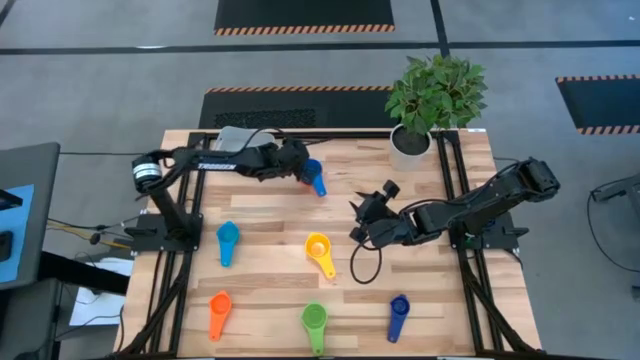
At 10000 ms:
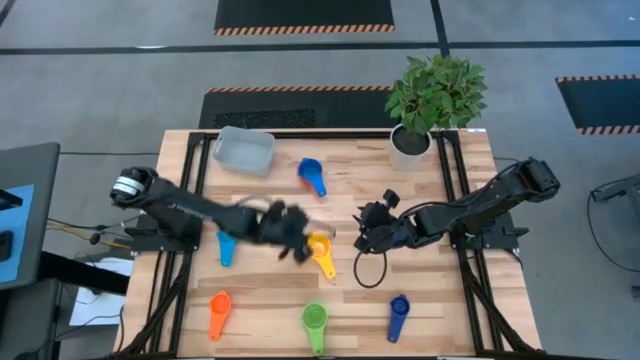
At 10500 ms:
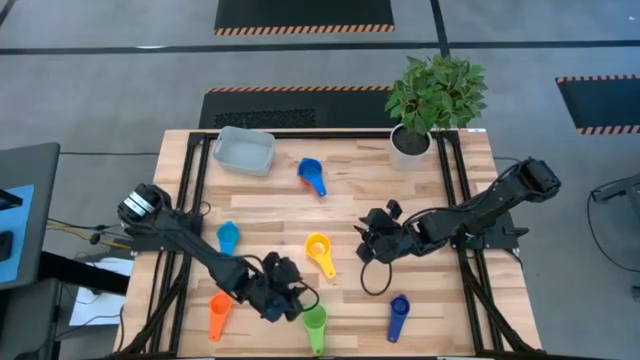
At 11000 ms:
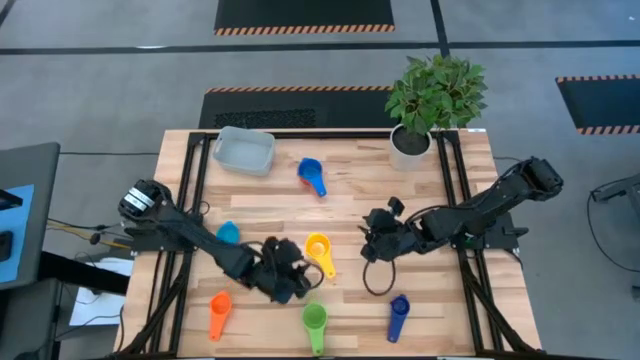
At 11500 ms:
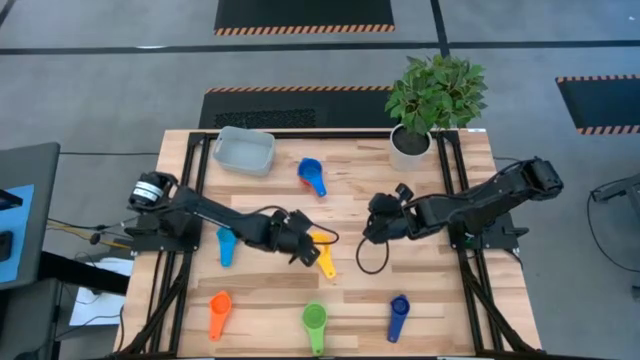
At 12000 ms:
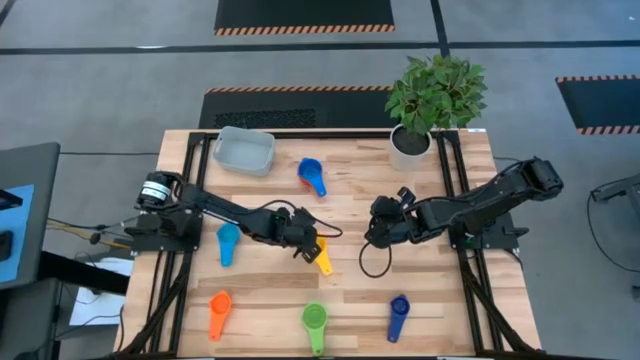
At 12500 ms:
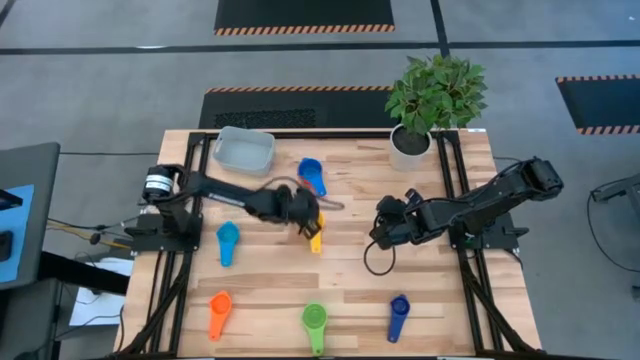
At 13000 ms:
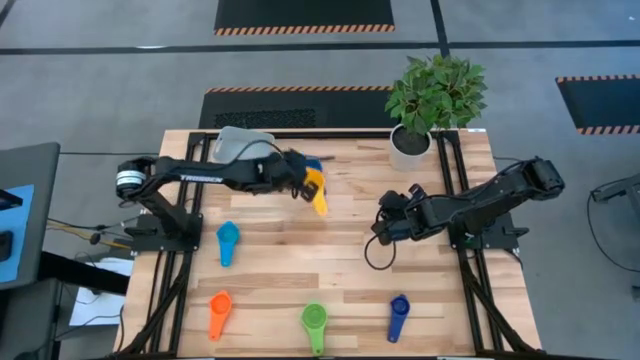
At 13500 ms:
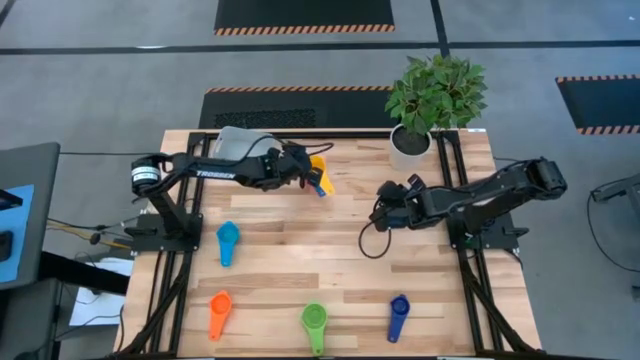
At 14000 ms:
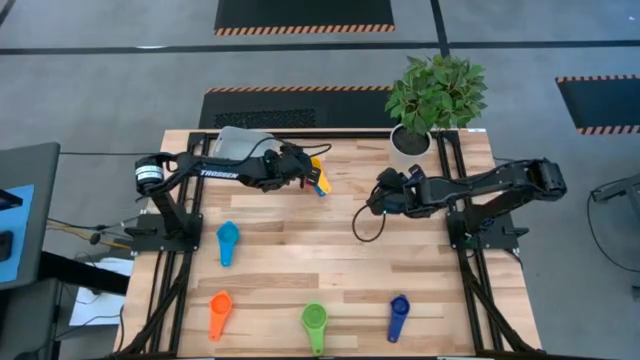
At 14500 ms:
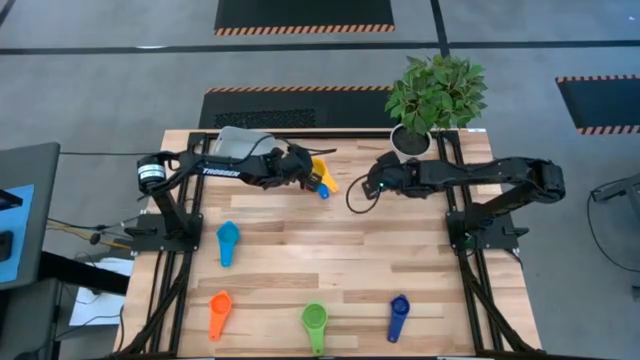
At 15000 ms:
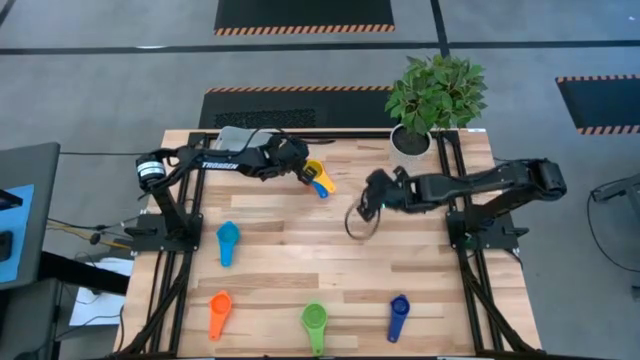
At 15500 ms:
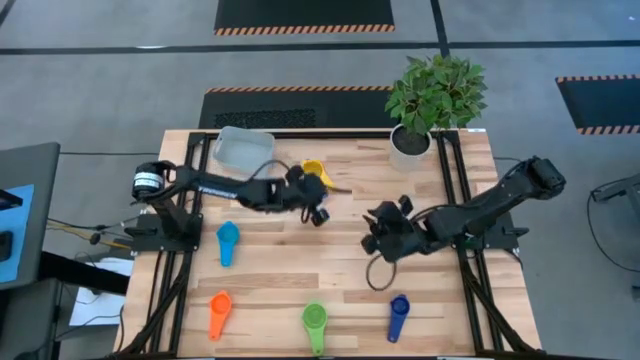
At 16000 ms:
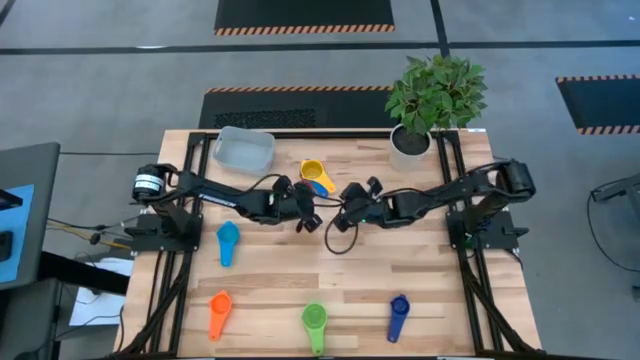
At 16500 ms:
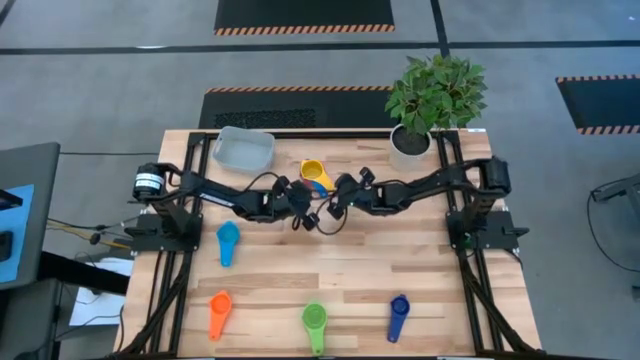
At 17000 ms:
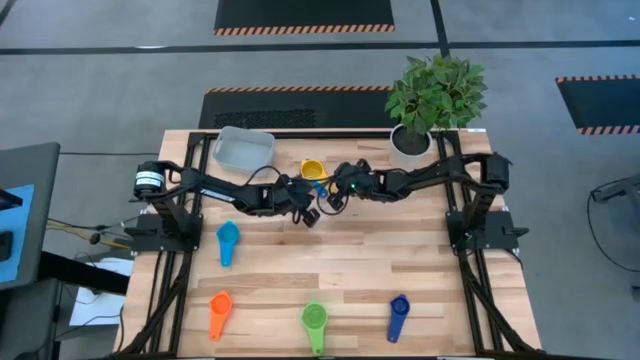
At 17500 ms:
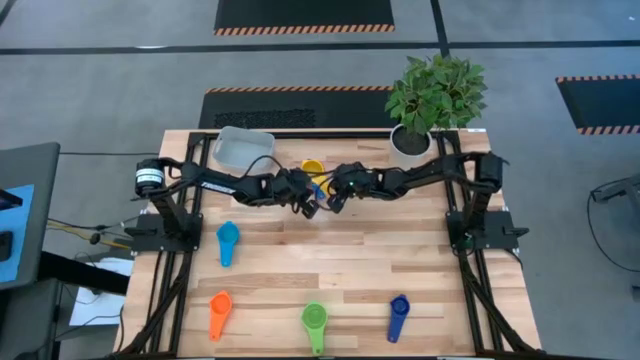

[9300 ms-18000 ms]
Task: Nest measuring cups in basket
Stack the yellow measuring cup on top of the blue measuring cup

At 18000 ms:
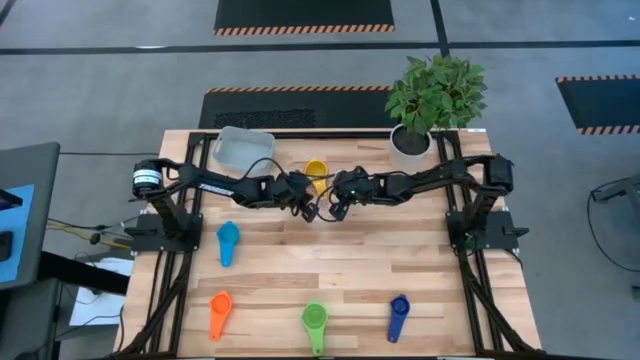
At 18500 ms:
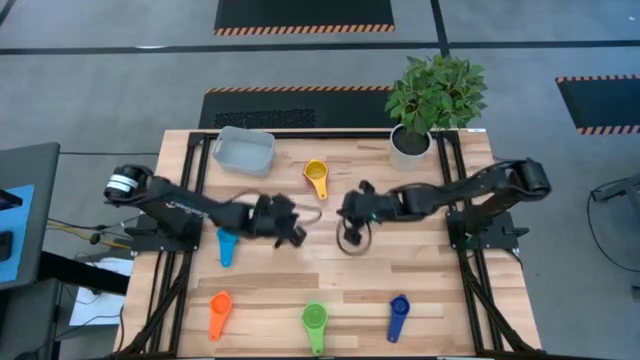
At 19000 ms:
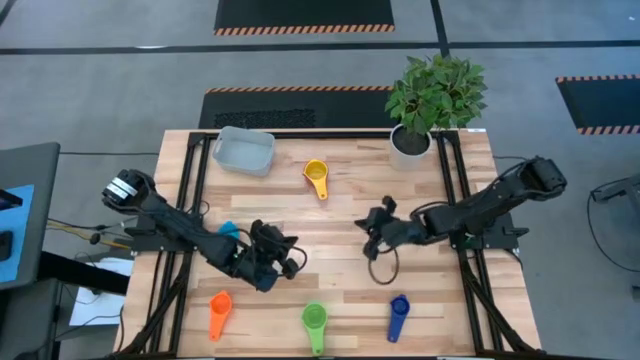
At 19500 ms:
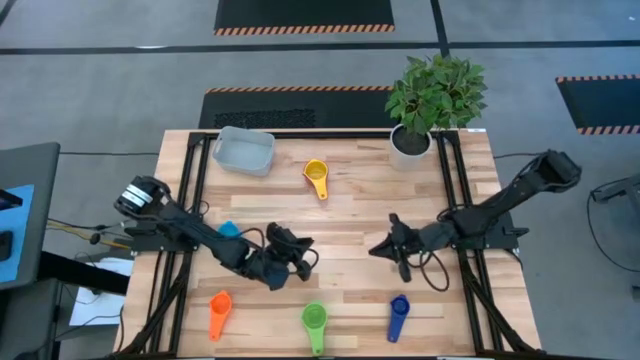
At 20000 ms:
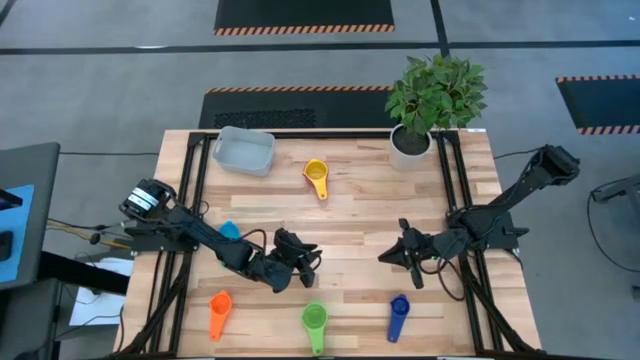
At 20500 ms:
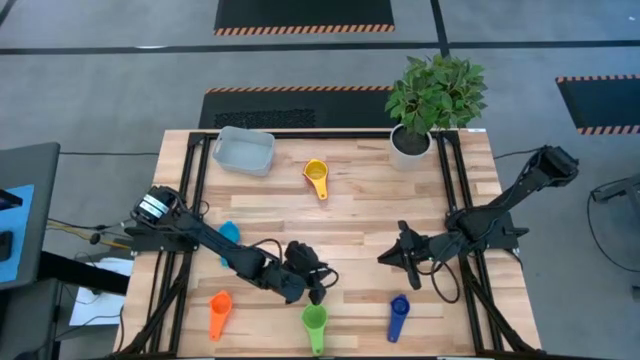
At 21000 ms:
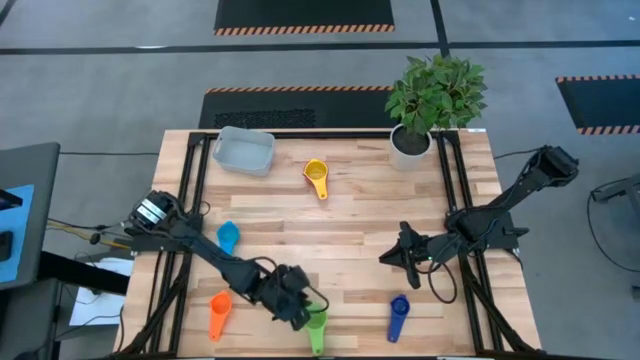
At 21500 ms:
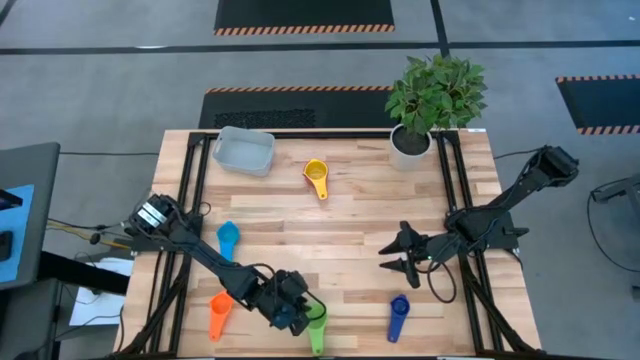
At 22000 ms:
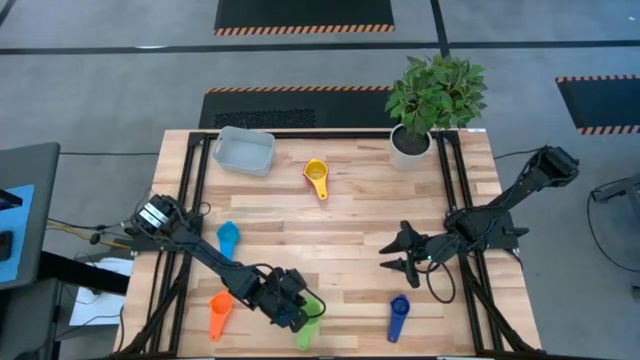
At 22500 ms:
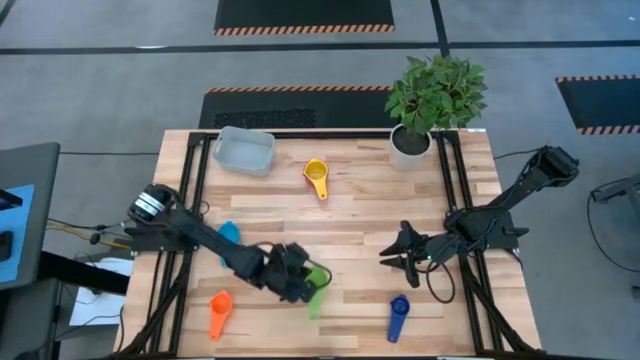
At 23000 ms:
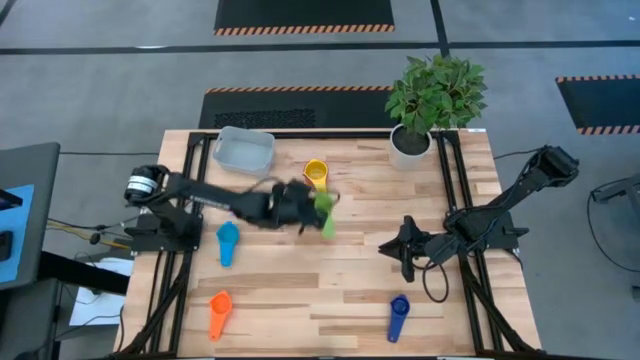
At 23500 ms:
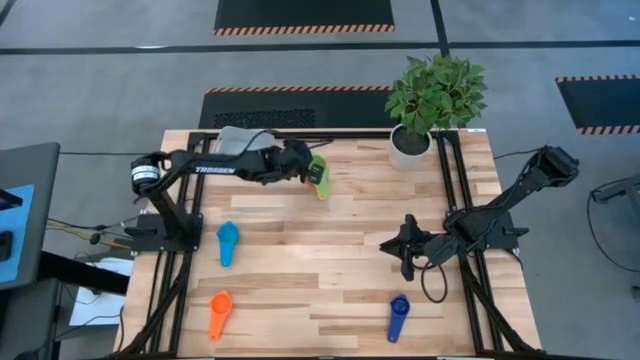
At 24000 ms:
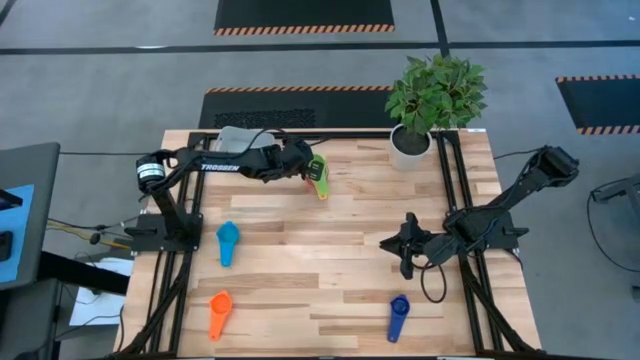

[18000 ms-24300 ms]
Stack the light green measuring cup on top of the yellow measuring cup

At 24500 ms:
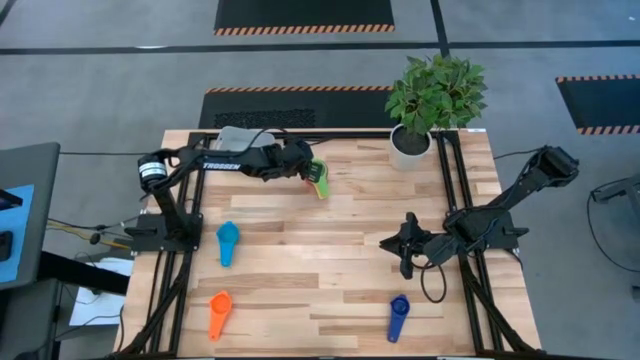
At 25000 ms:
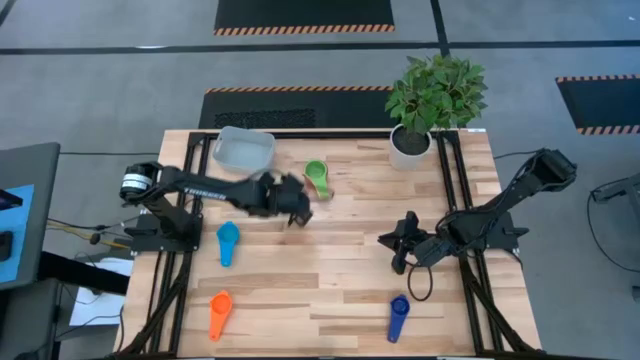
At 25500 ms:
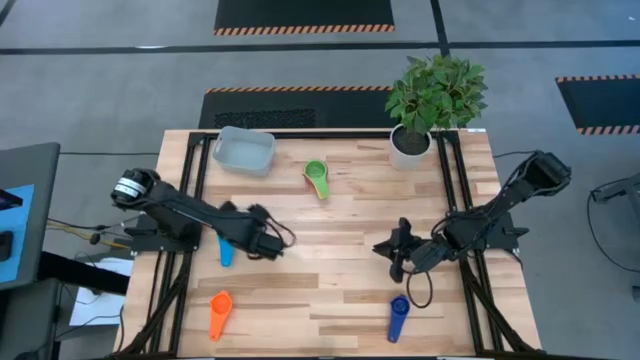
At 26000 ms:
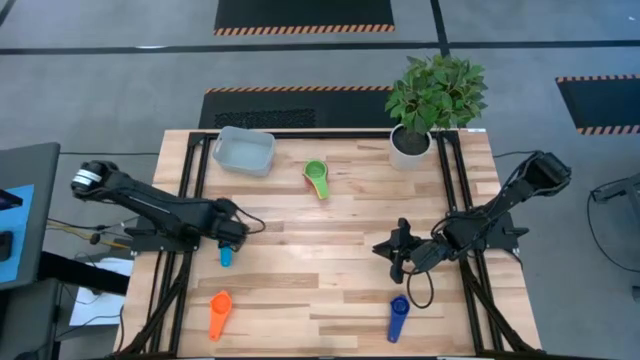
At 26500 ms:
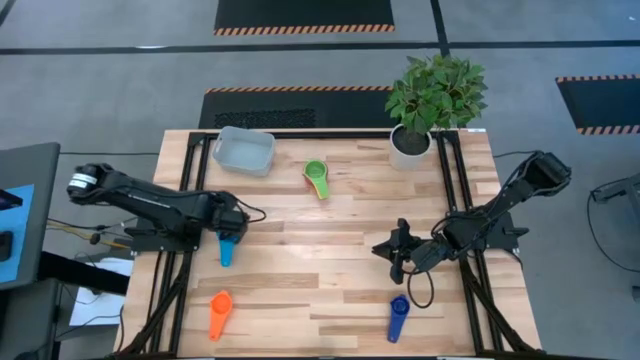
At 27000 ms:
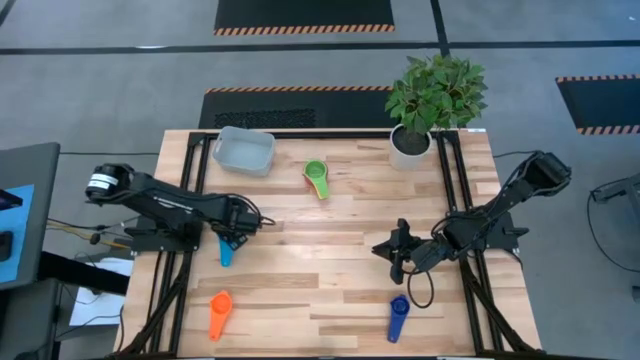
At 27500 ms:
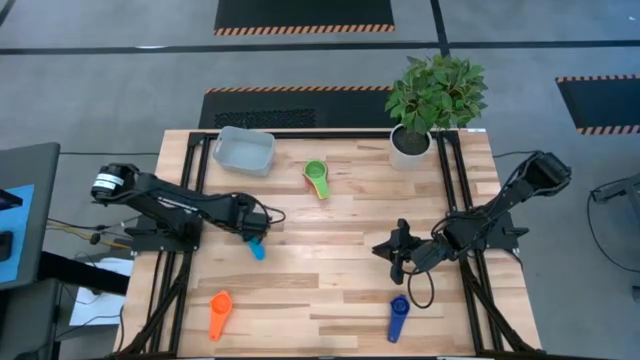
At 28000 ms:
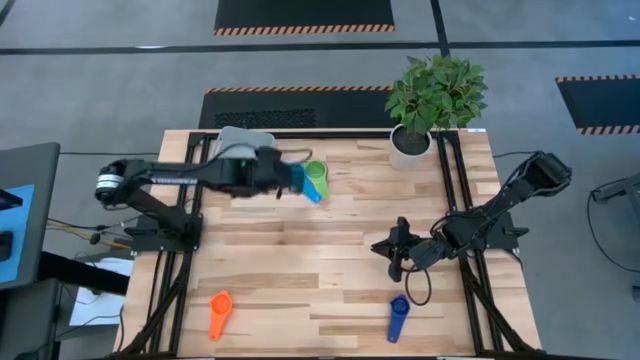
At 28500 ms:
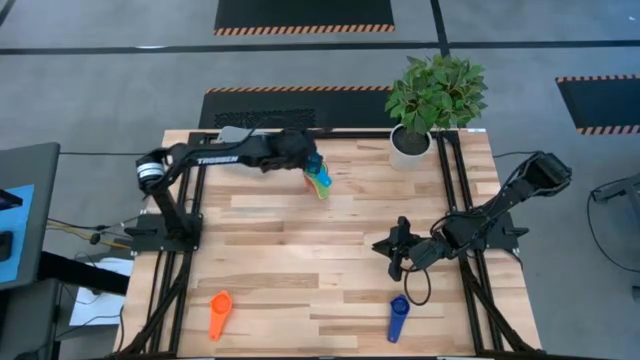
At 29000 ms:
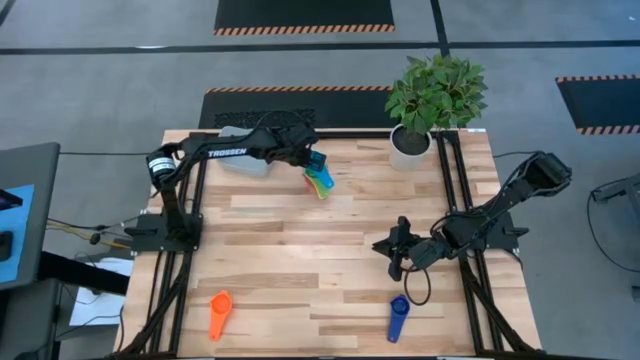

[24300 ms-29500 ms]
Stack the light blue measuring cup on top of the light green measuring cup

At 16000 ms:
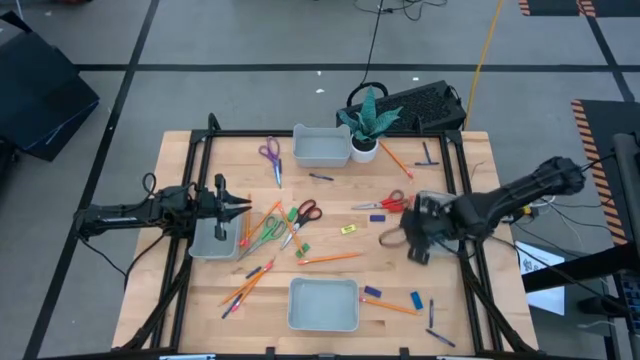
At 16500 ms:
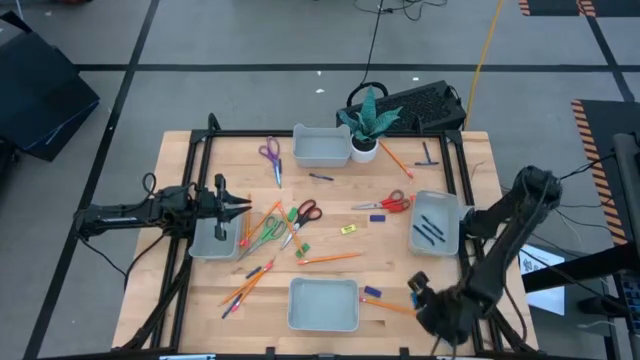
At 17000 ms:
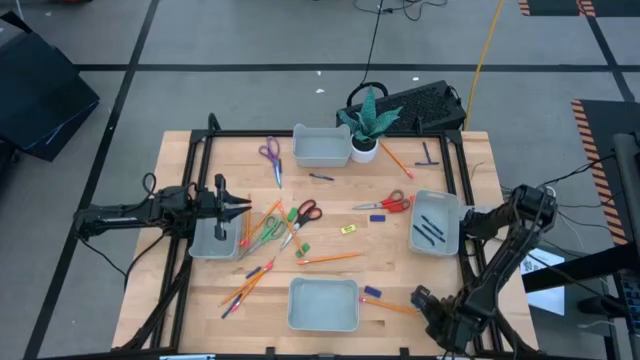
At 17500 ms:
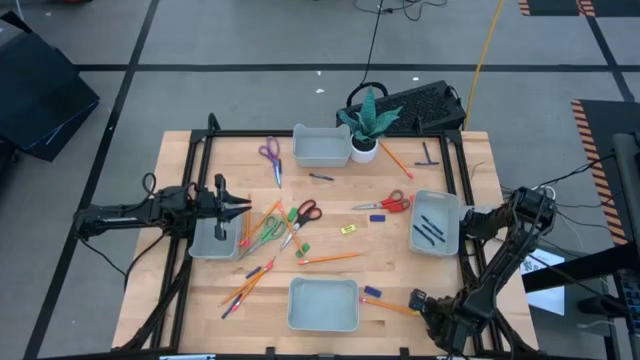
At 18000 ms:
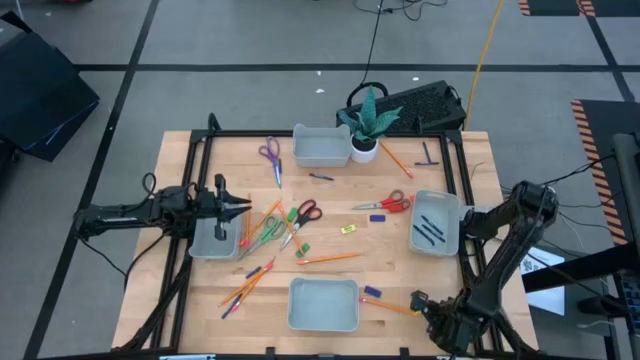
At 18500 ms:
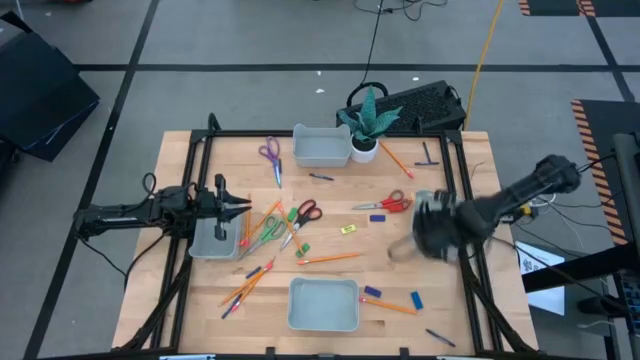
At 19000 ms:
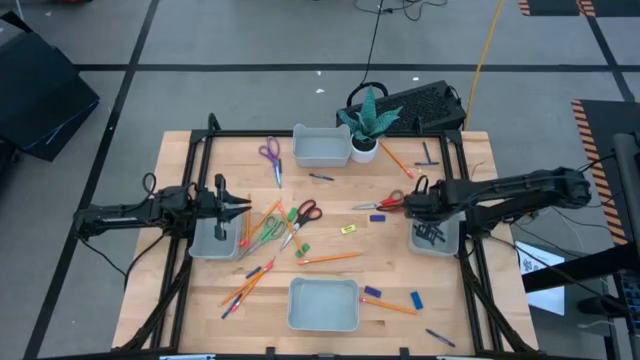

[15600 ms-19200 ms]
Task: Sort crayons/erasers/pens/pencils in bins
Put the blue crayon into the middle right gray bin
